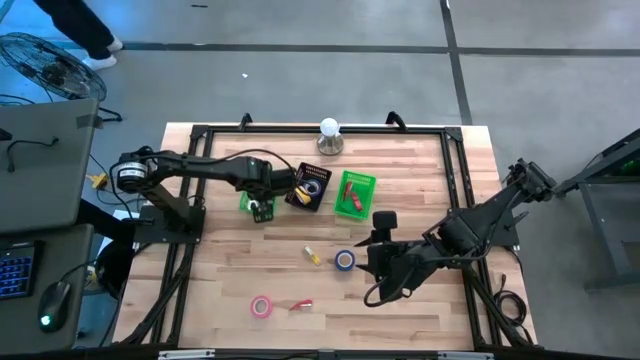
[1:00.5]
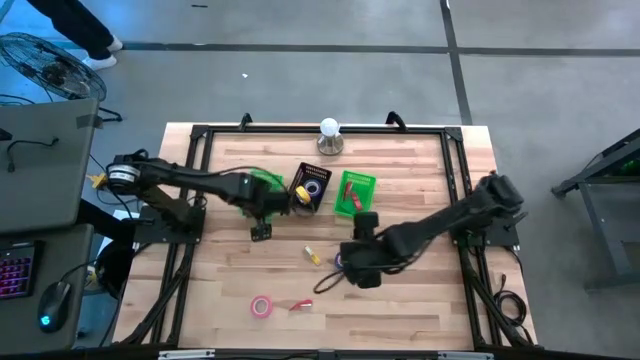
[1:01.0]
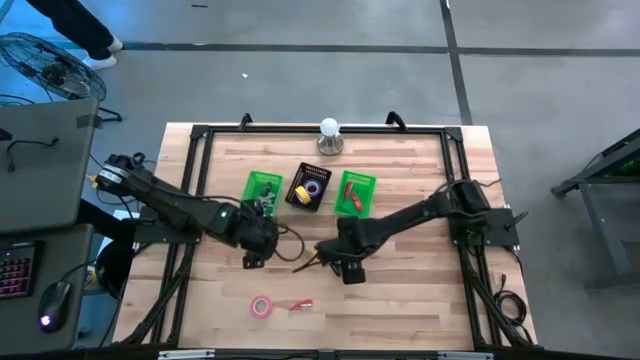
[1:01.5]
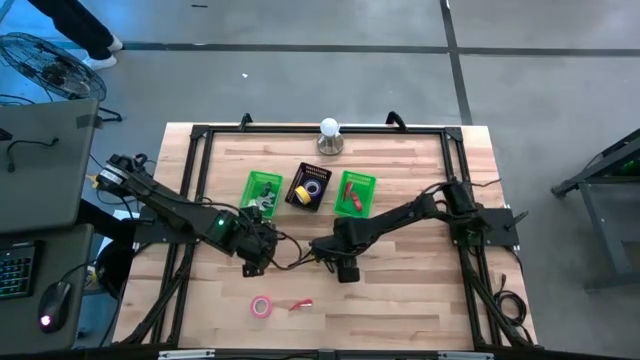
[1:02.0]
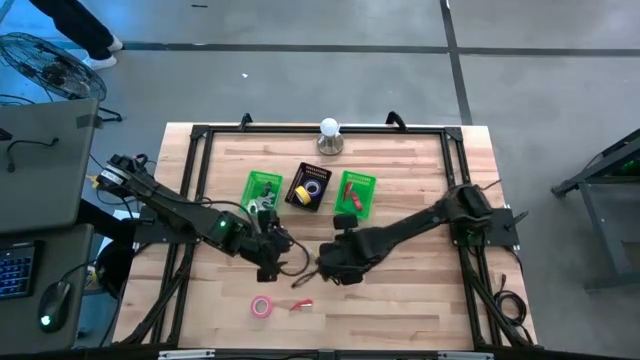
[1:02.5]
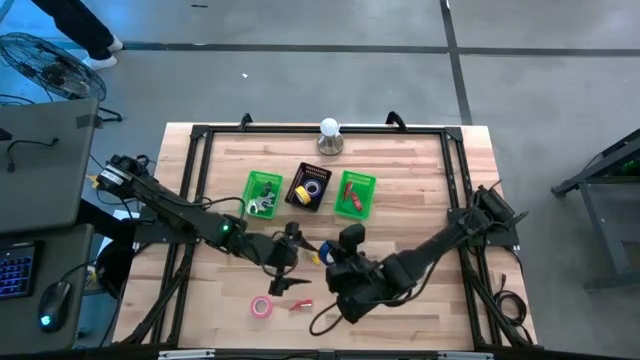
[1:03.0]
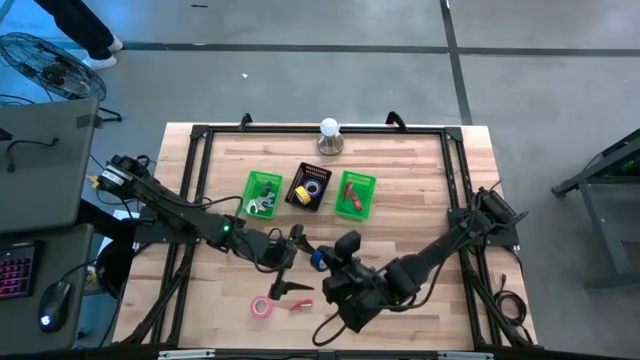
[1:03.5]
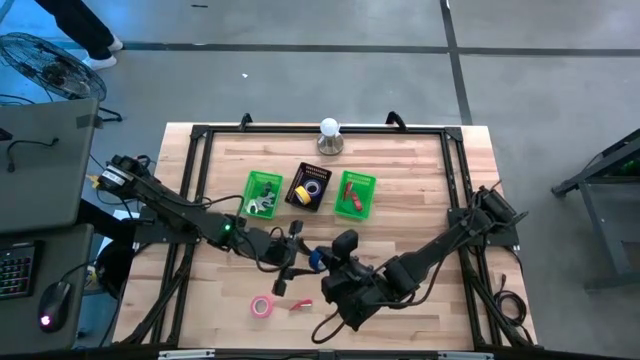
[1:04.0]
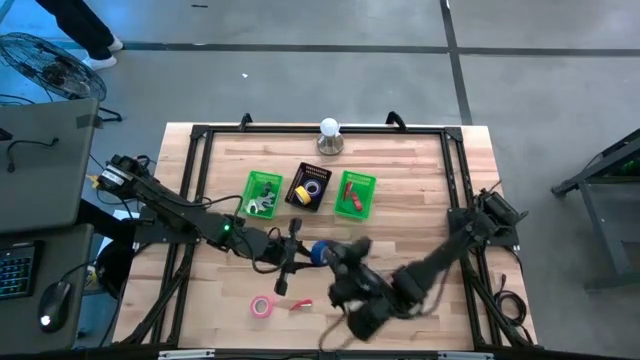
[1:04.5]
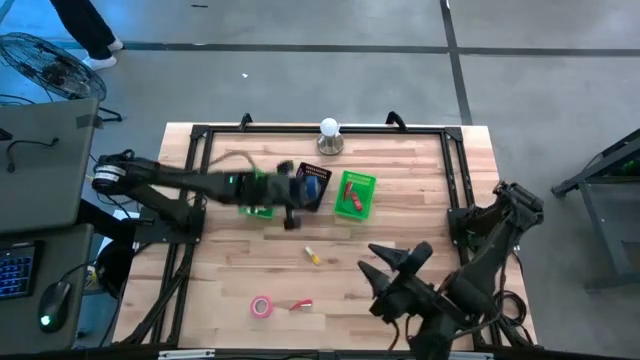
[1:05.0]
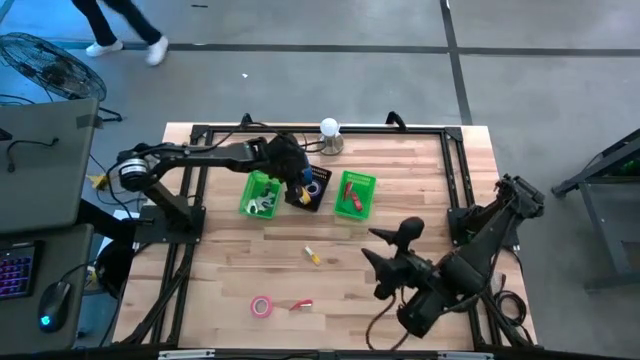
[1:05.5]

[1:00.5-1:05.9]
Task: Pick and place Stapler, Stapler remover, tape
Put the blue tape into the black bin

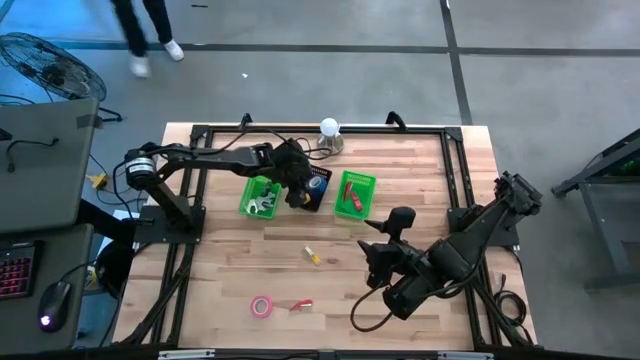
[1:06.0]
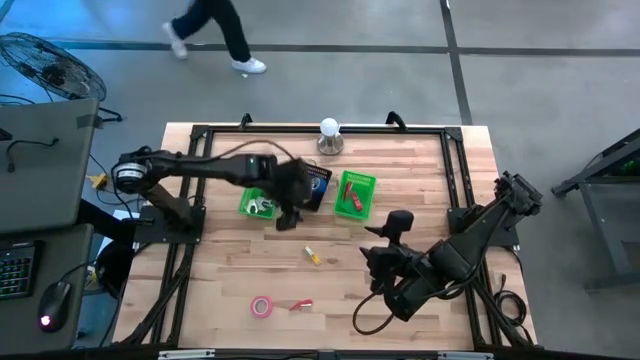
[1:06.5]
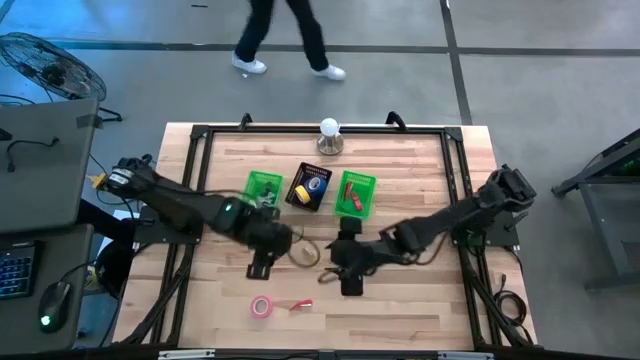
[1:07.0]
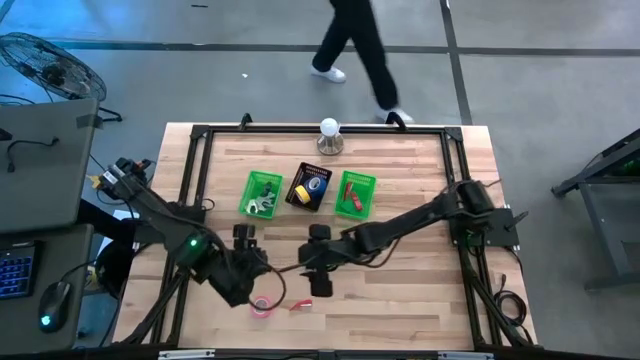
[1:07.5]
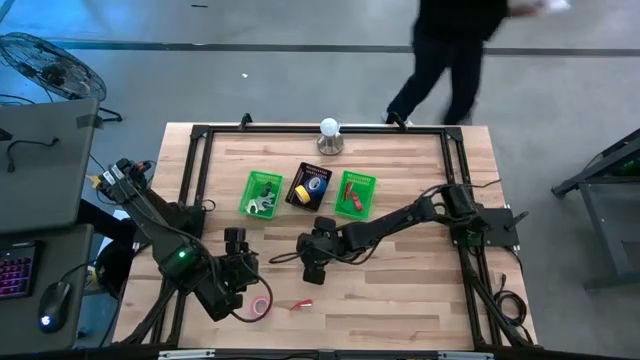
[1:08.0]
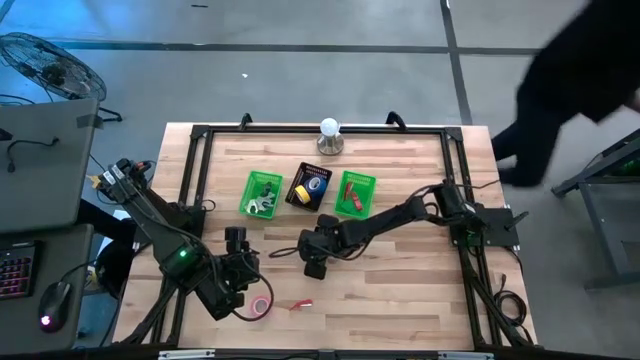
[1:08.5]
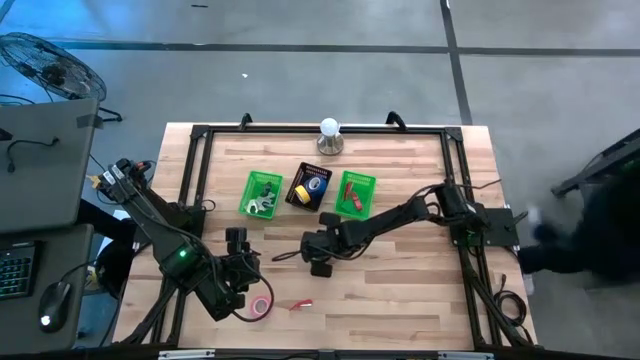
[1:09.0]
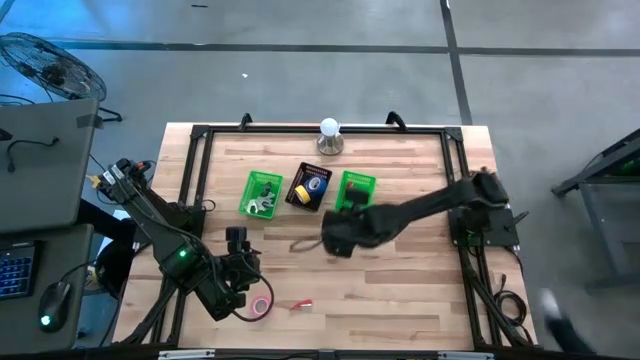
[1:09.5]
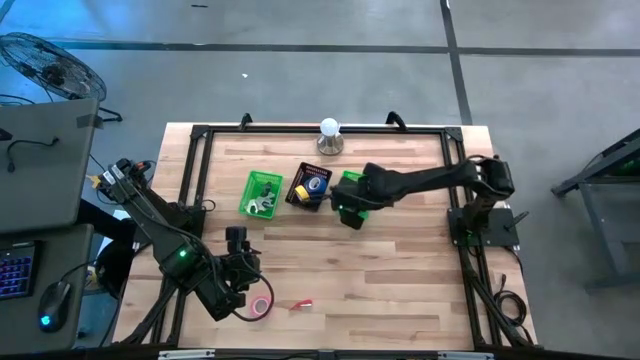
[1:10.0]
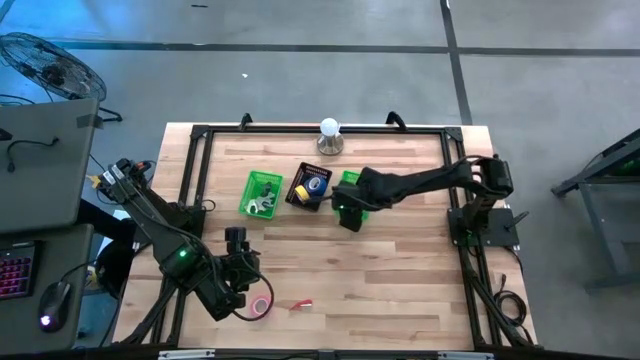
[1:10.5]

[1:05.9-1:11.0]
Put the yellow stapler into the right green bin

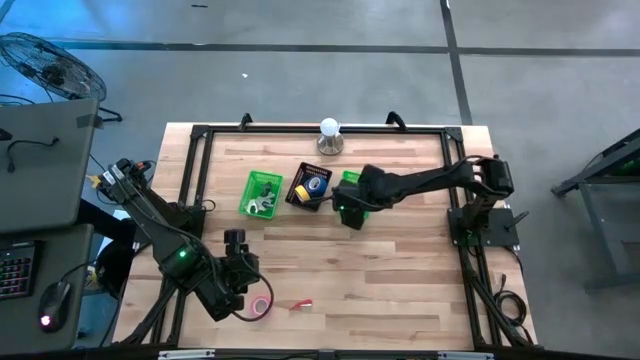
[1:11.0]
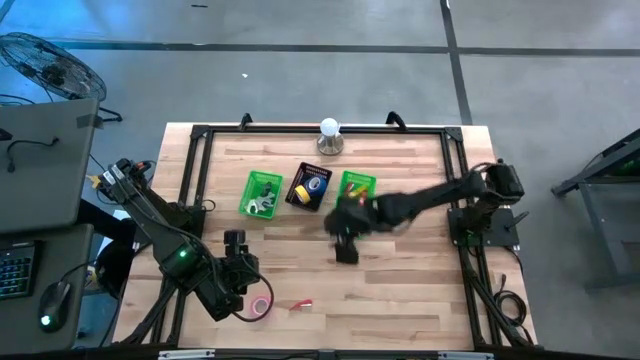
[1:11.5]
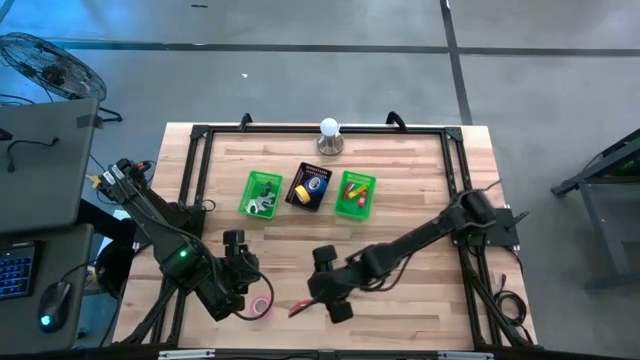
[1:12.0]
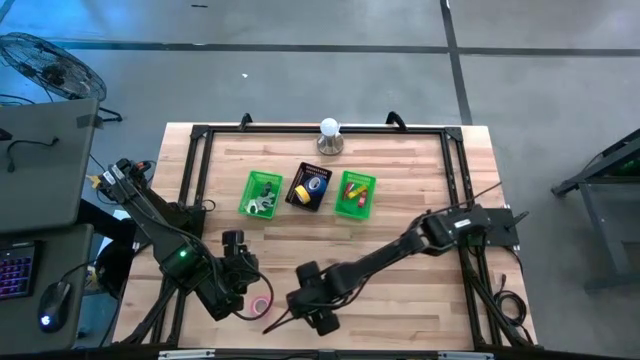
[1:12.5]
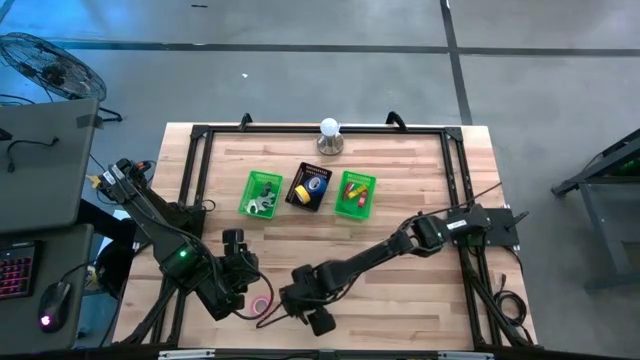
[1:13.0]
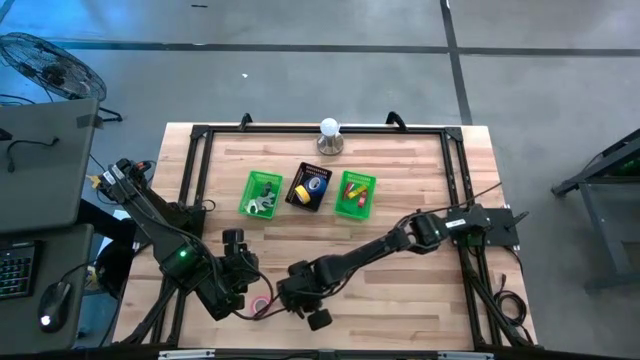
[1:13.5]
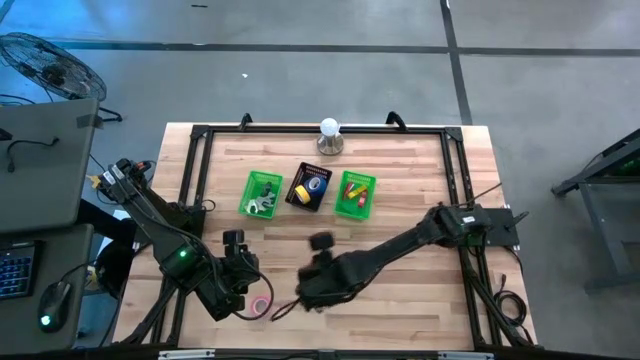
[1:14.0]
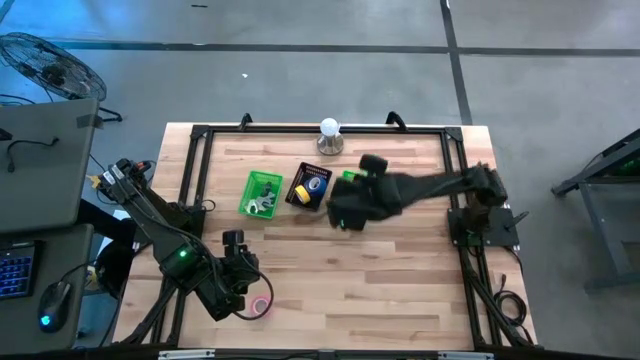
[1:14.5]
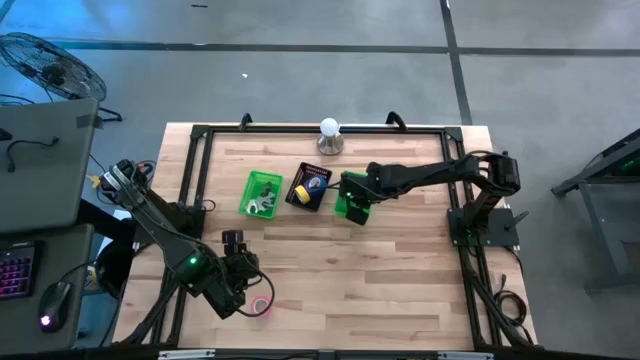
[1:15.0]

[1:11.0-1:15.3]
Put the red stapler into the right green bin

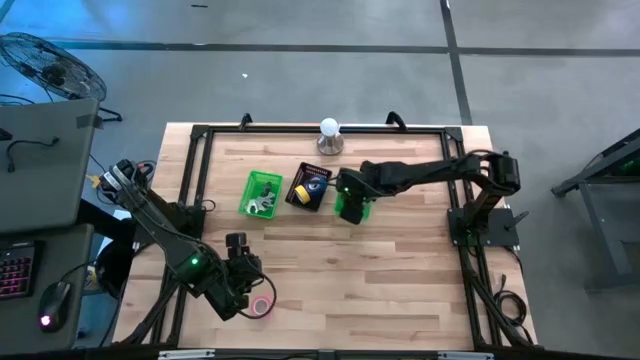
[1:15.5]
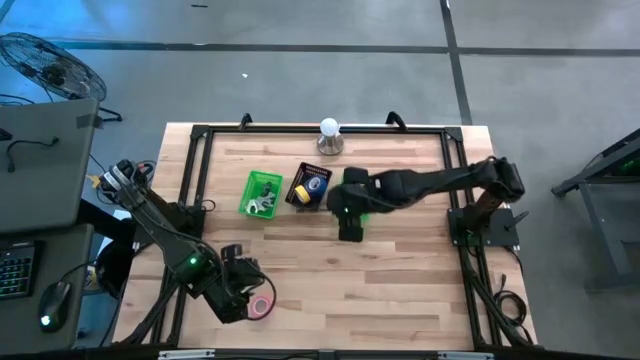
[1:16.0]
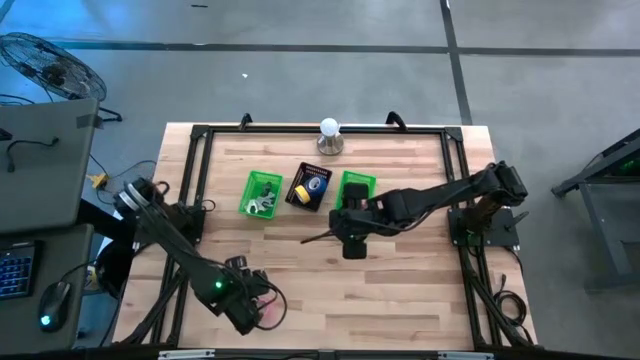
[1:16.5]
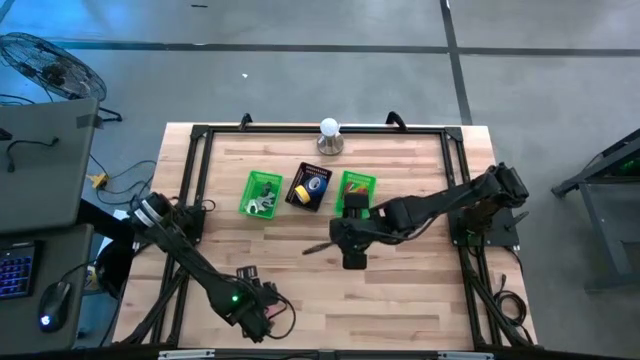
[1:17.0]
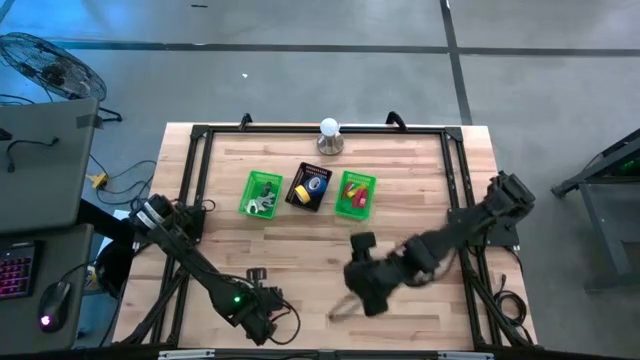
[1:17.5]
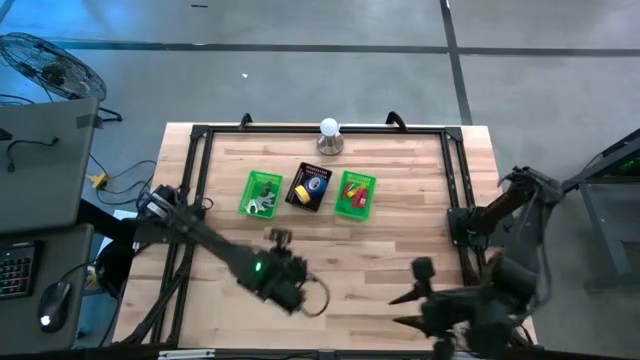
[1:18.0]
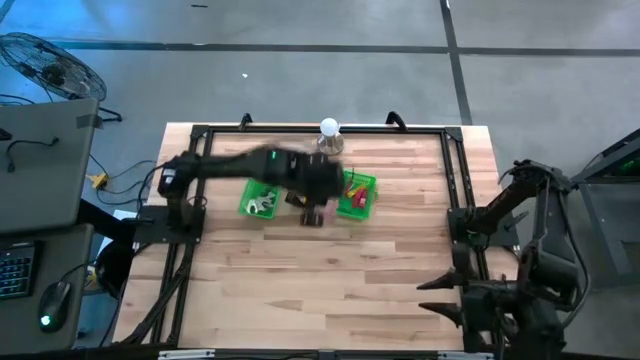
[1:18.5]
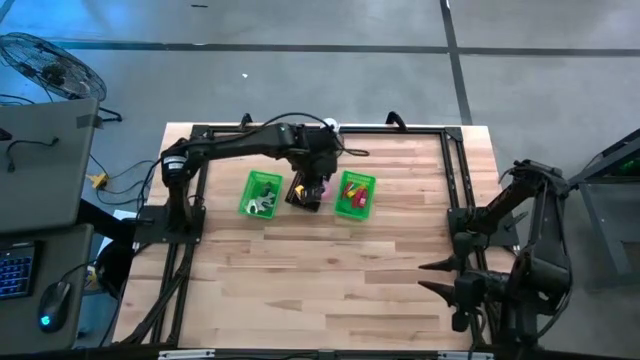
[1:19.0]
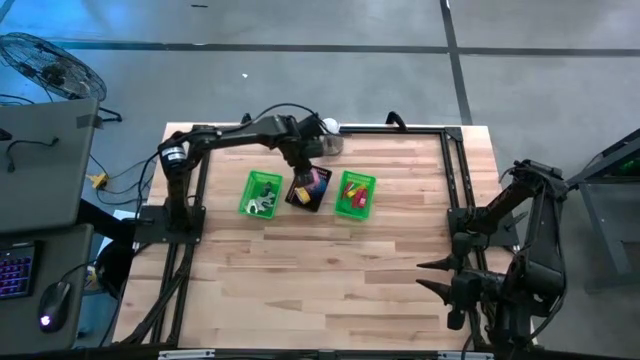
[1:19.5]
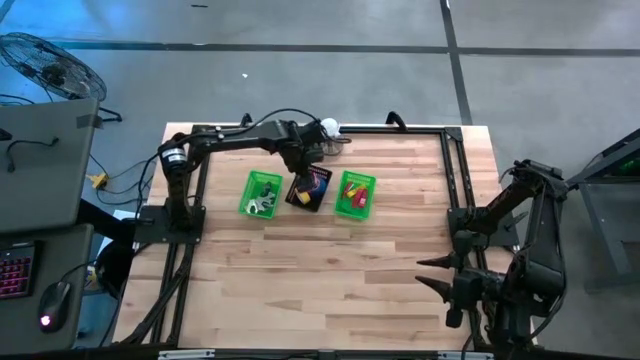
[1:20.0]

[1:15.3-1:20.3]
Put the pink tape into the black bin

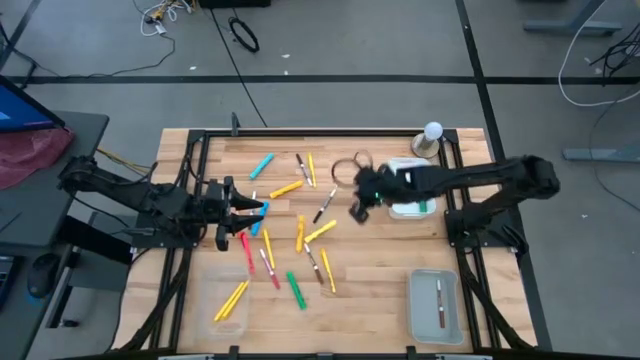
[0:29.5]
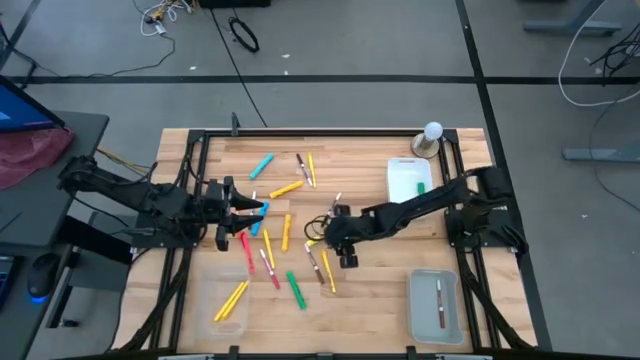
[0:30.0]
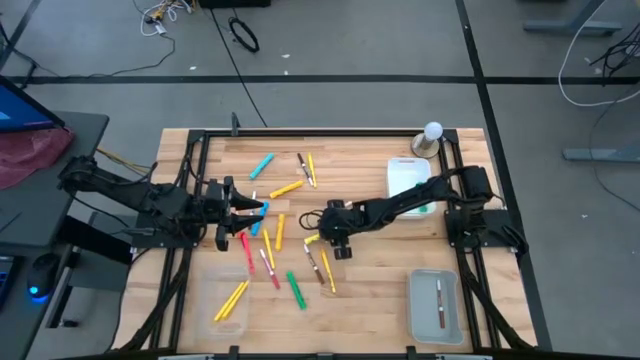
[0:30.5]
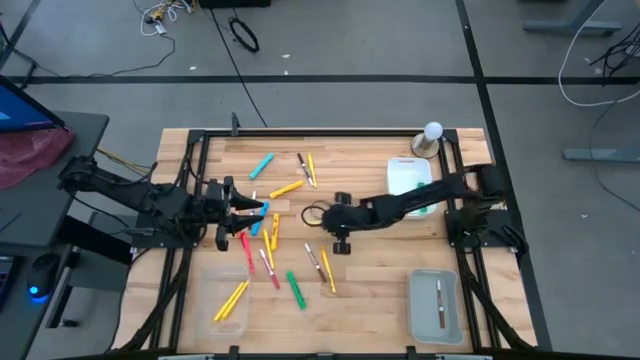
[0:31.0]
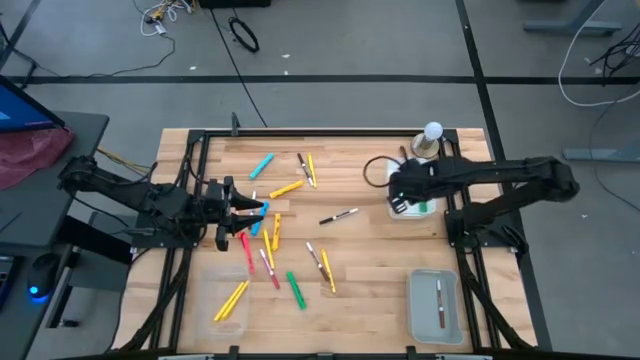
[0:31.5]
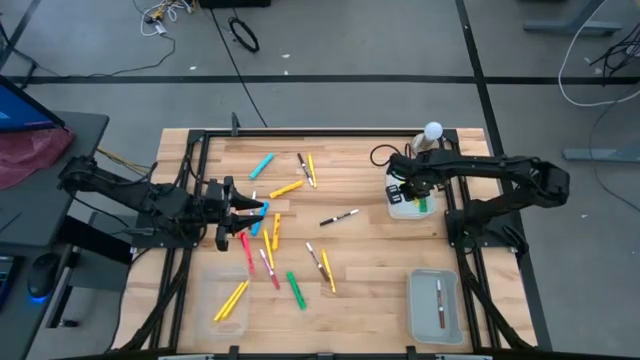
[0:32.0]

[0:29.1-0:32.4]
Task: Pick & Place Markers
Put the yellow highlighter into the white bin
